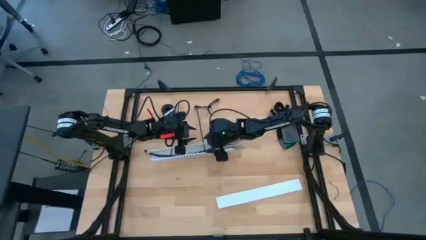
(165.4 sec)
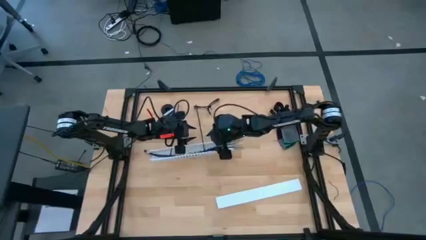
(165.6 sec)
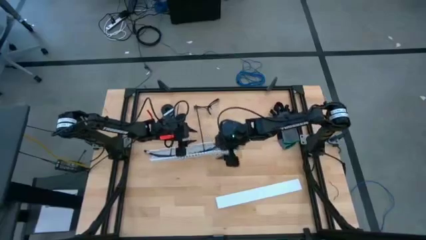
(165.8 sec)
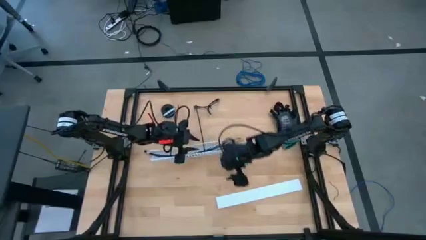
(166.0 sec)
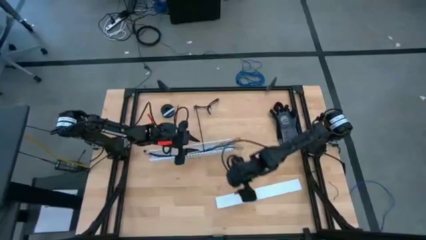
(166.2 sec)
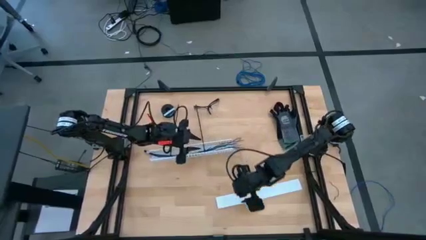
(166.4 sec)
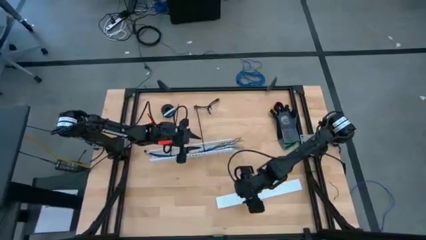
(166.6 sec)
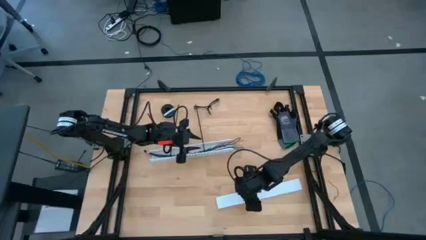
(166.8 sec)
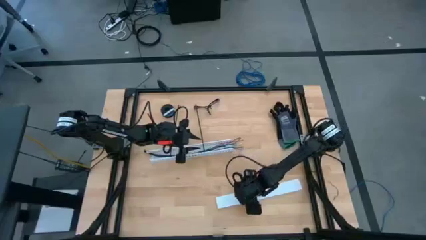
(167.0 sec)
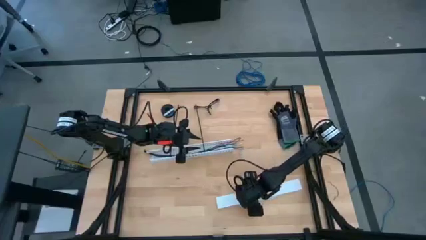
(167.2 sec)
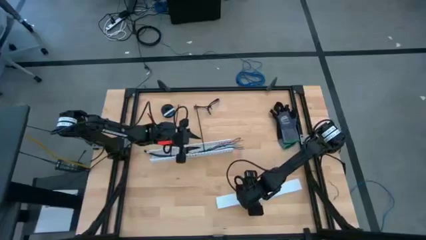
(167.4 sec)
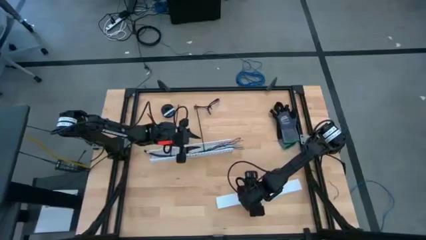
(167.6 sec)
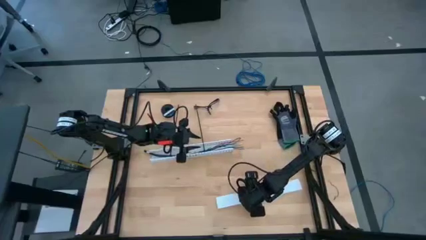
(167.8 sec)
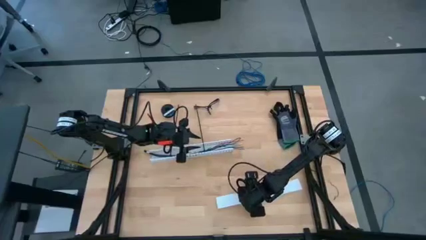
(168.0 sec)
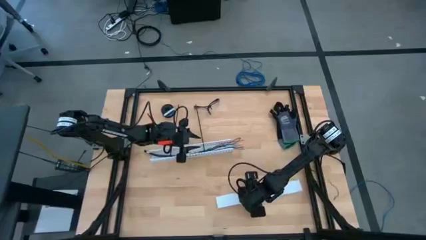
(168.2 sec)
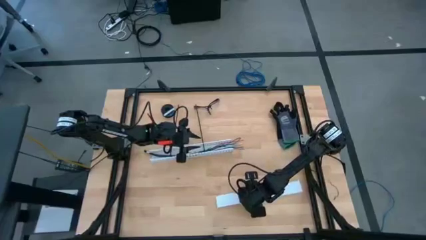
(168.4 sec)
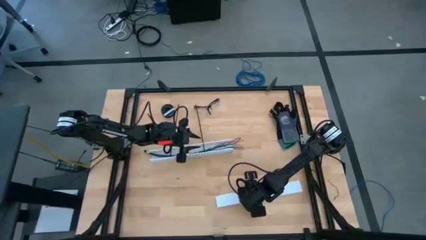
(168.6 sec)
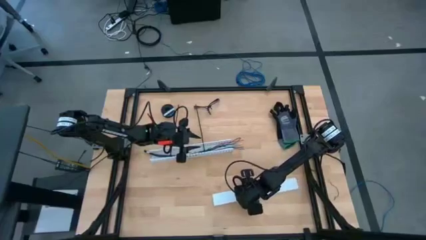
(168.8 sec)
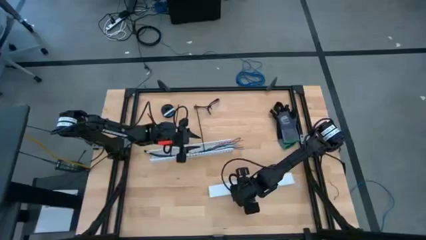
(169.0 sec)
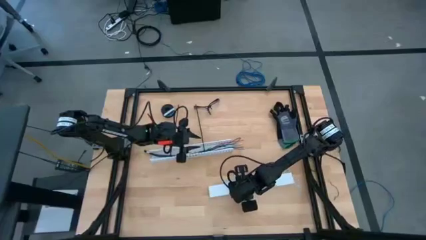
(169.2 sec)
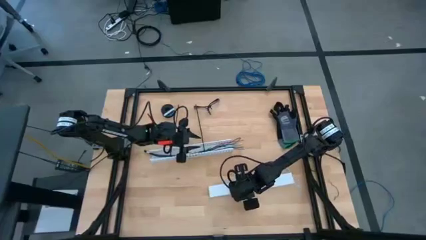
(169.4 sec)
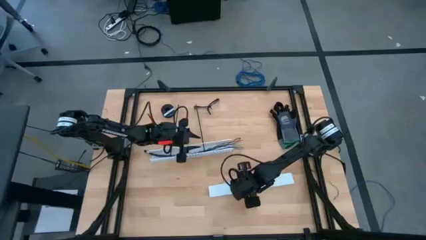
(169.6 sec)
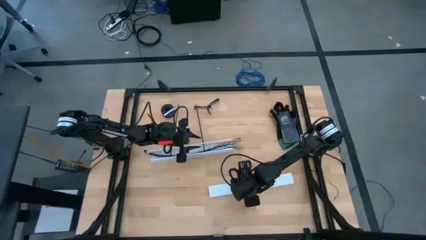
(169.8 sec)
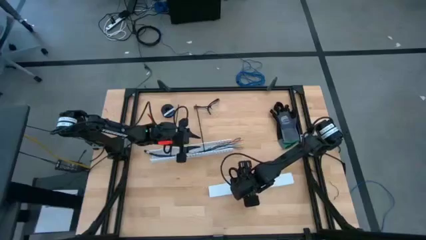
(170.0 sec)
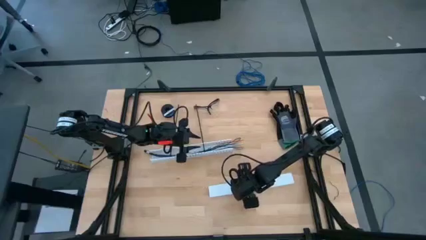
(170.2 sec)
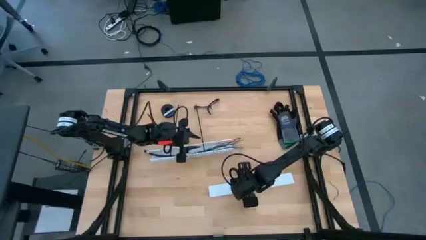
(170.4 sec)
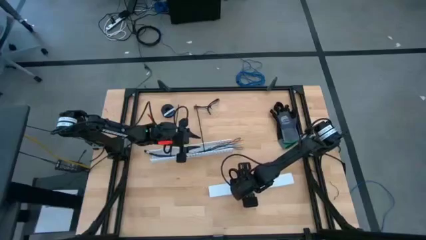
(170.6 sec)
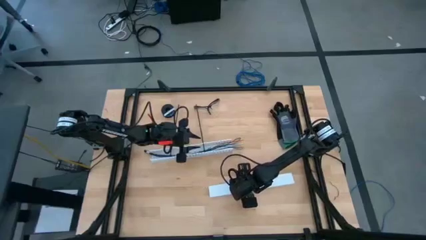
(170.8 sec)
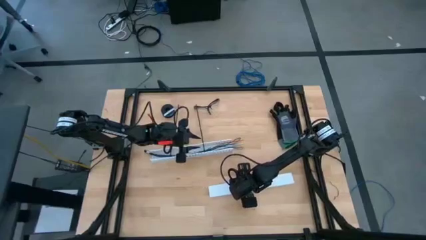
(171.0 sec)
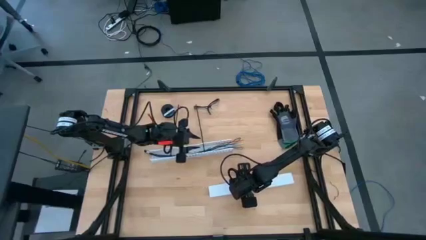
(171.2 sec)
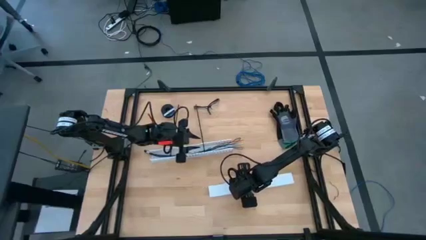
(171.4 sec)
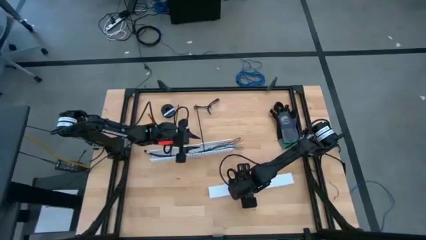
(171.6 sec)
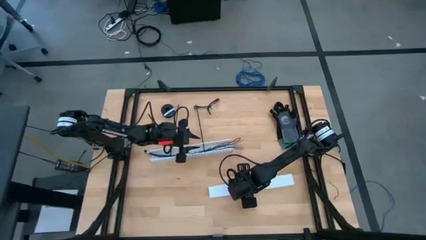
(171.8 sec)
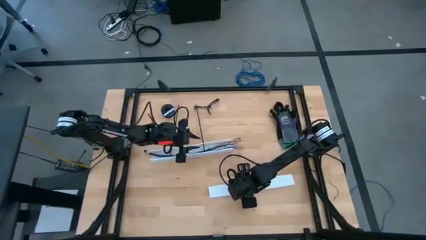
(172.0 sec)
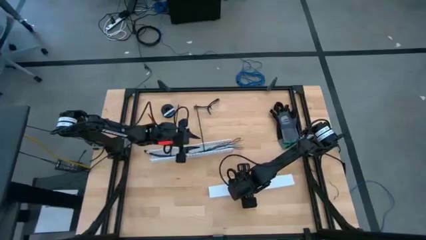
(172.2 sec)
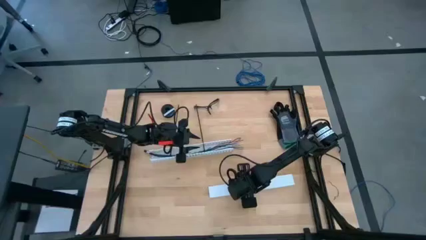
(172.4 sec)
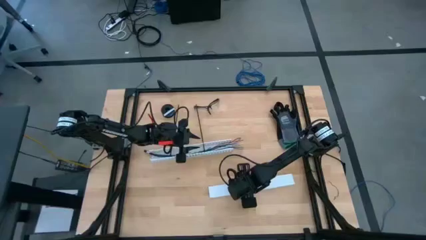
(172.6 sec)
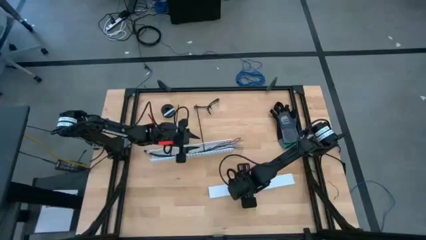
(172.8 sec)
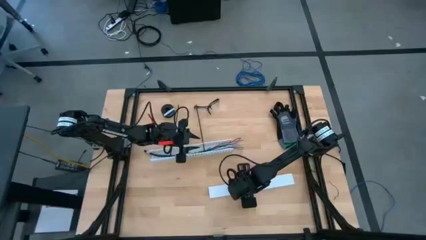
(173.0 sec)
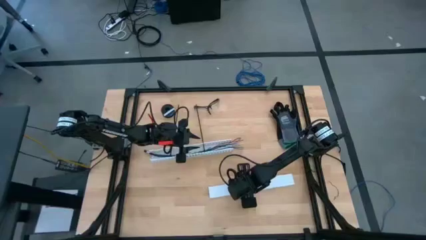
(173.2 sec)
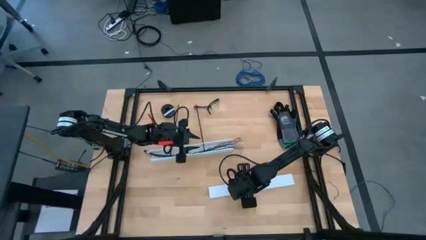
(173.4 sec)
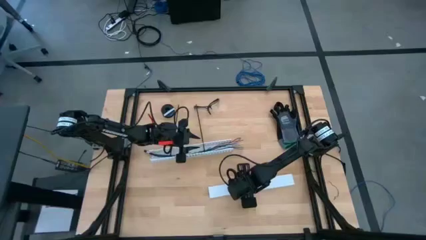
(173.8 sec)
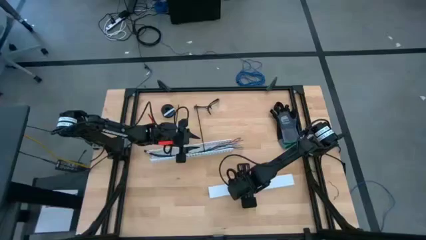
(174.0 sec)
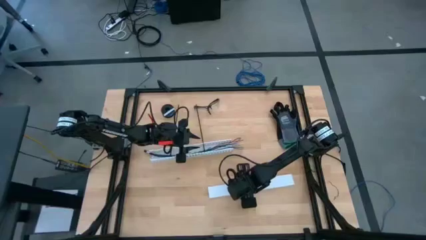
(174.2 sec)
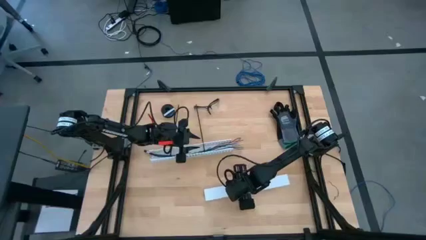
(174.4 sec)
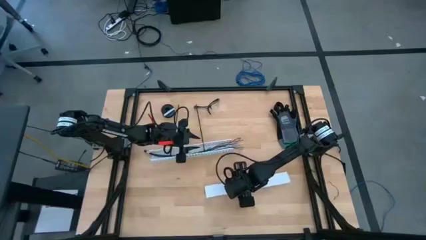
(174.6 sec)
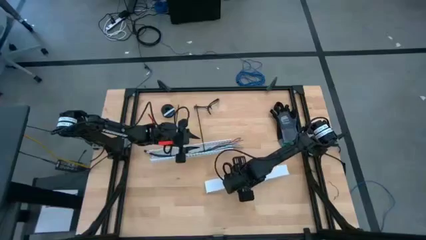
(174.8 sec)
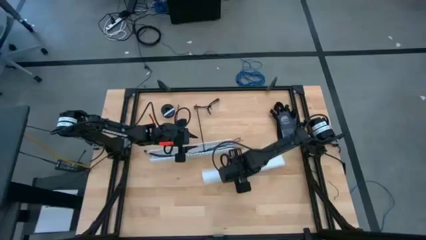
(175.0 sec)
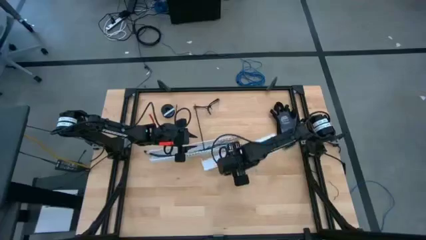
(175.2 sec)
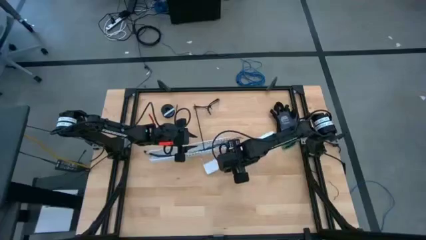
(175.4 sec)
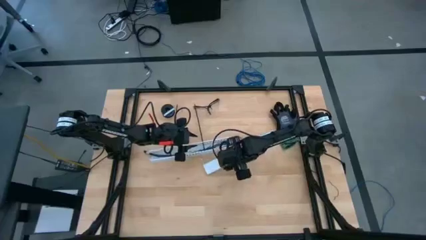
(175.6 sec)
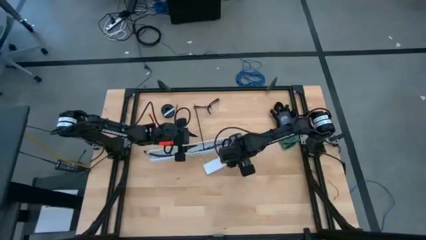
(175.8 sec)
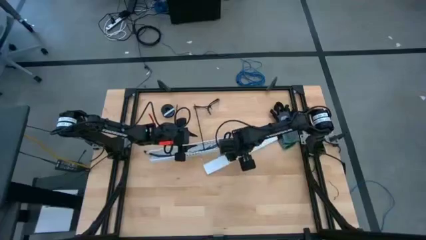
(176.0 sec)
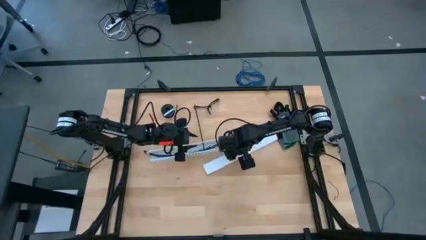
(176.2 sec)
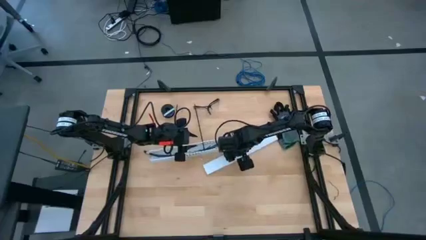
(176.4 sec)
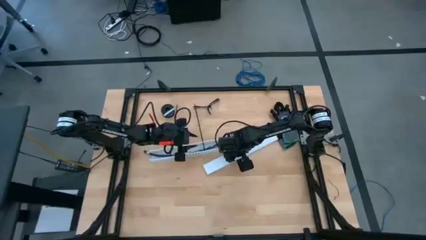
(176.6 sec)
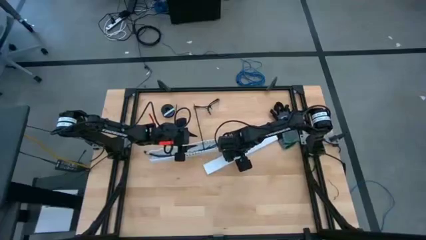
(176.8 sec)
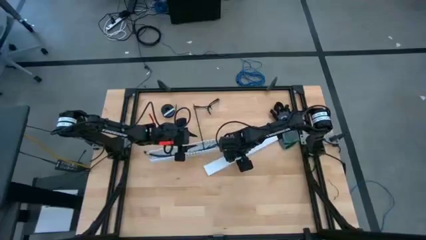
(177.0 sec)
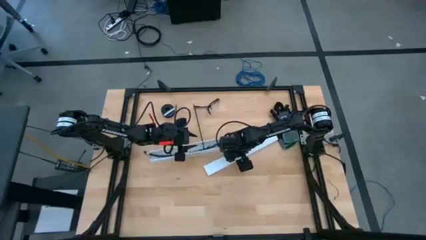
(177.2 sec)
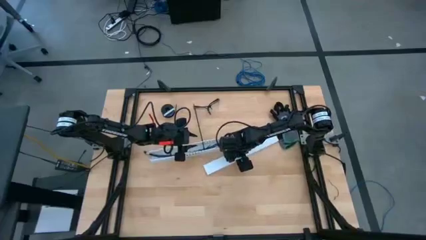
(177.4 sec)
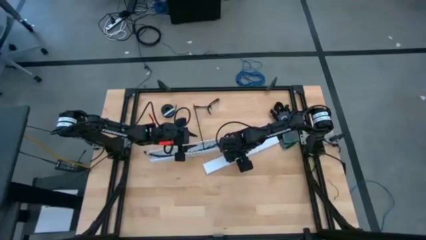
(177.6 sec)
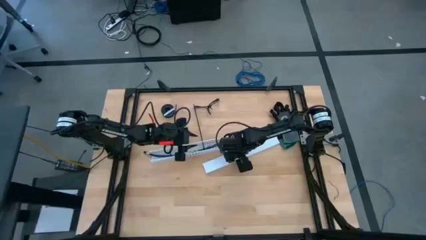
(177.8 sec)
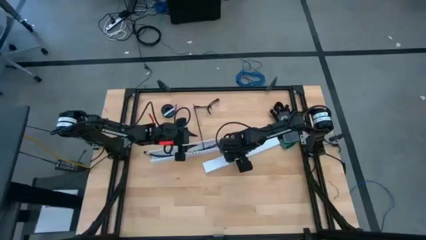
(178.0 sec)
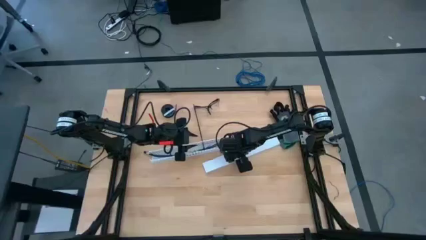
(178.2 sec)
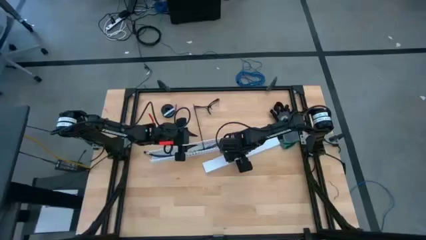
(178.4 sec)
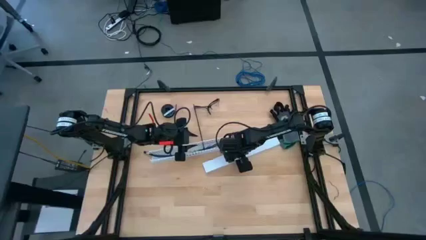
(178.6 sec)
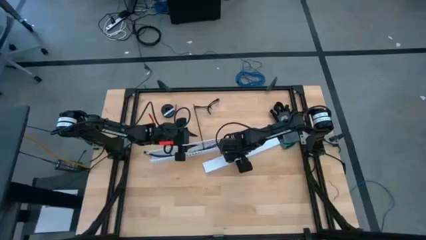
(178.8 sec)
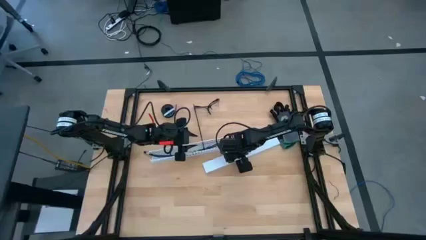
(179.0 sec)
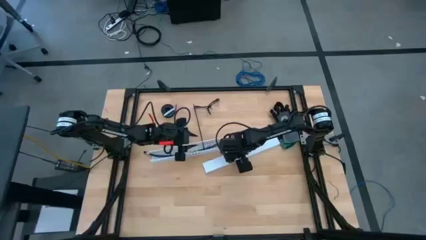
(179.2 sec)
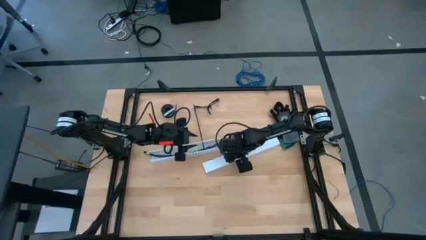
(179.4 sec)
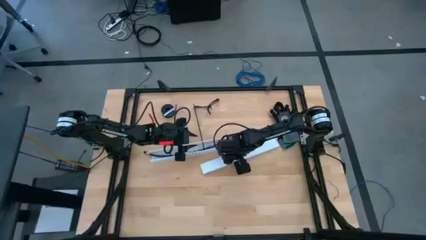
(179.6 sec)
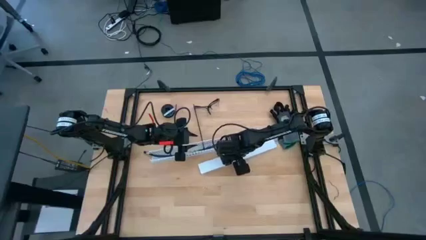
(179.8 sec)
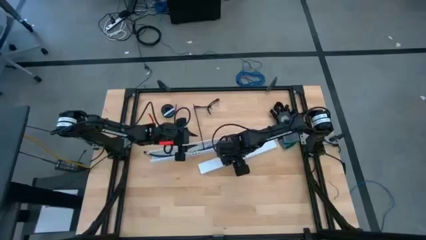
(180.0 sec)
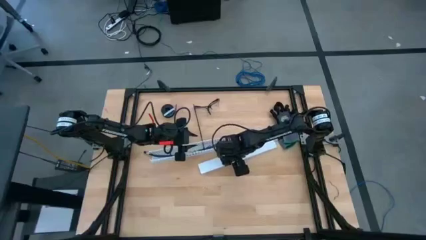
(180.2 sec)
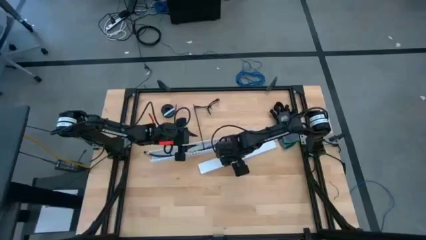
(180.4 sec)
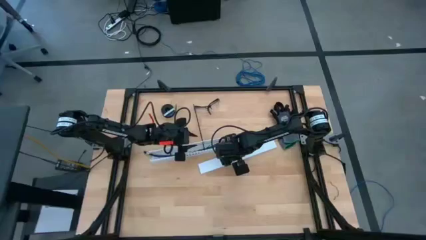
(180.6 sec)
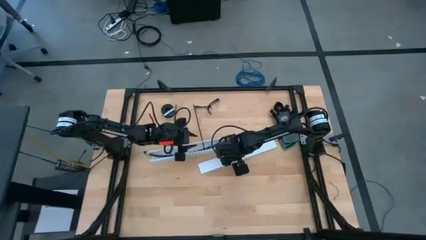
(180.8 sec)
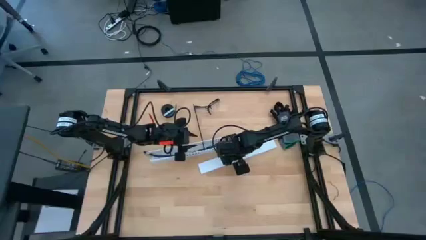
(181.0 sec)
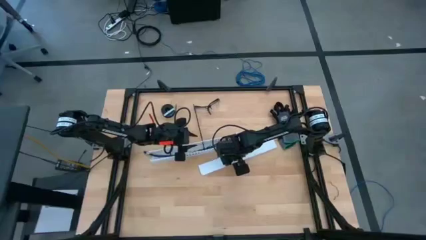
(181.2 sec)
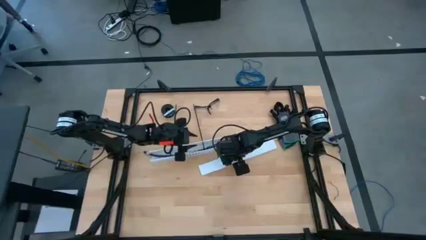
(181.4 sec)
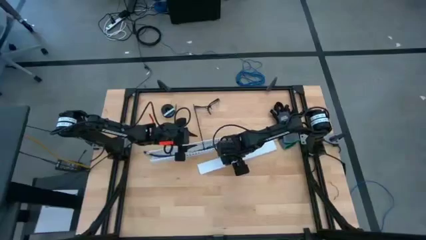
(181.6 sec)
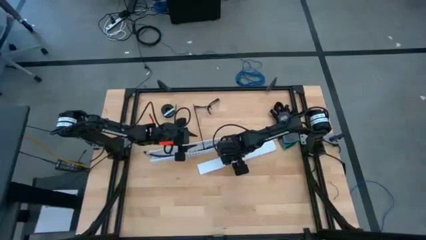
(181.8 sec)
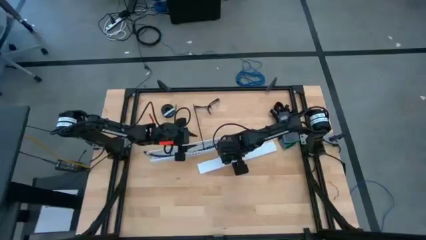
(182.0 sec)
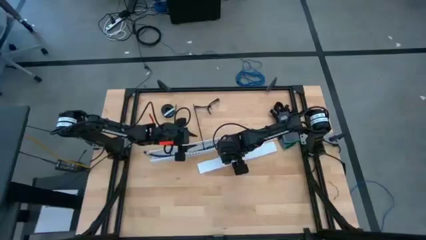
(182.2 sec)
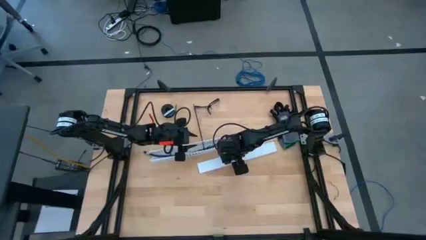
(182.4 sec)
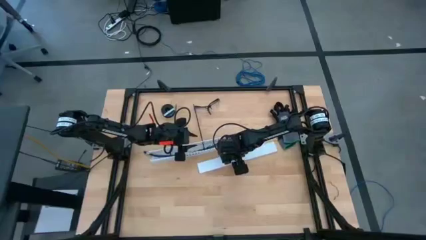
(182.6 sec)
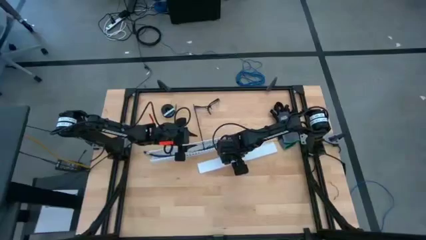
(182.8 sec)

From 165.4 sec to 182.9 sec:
Task: Ziptie cables
Close the white cable duct
